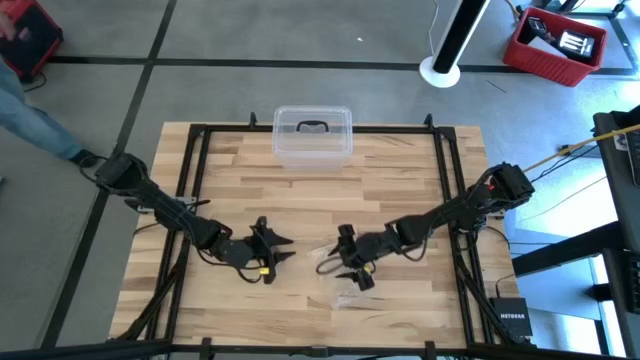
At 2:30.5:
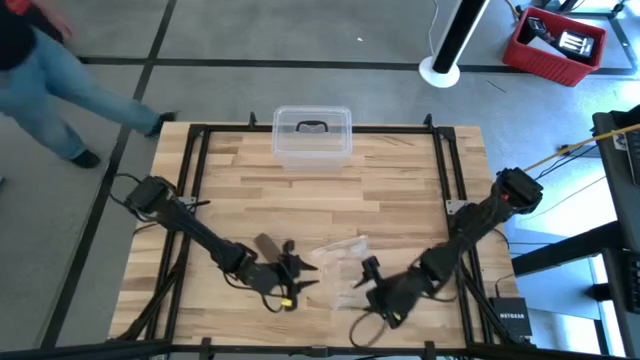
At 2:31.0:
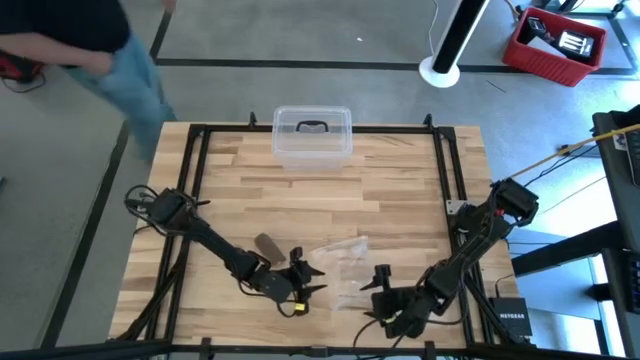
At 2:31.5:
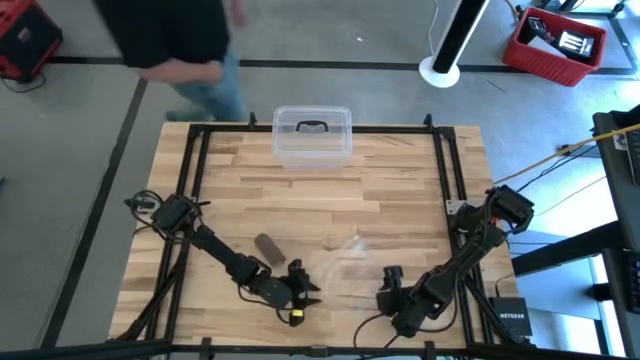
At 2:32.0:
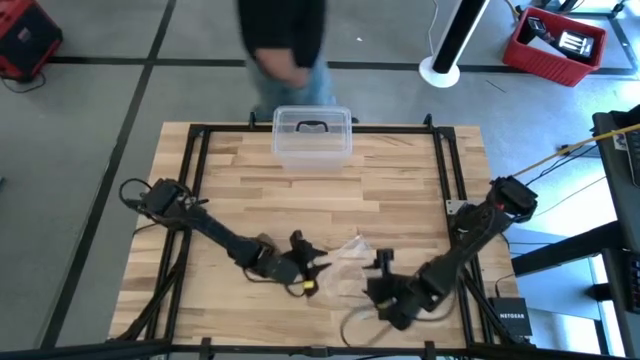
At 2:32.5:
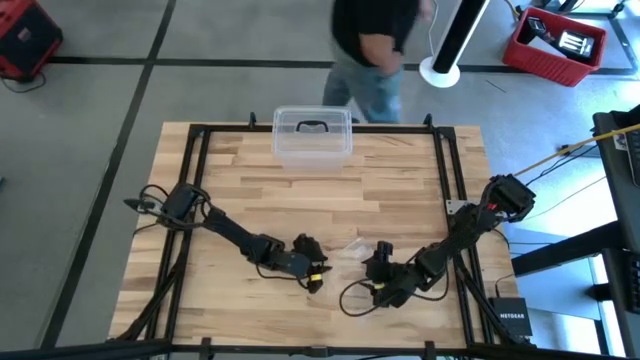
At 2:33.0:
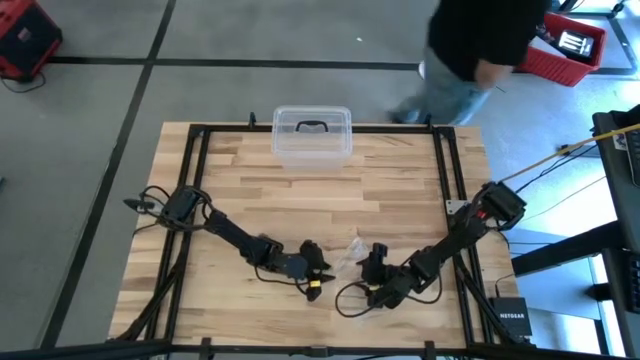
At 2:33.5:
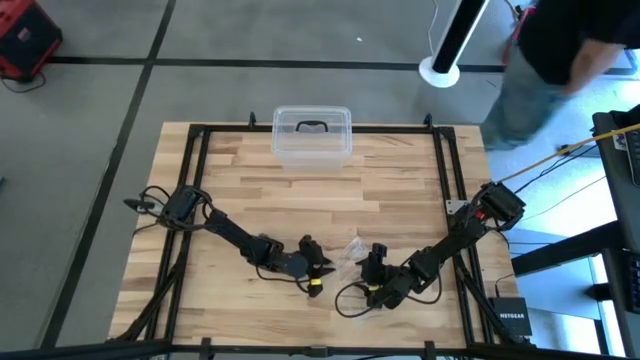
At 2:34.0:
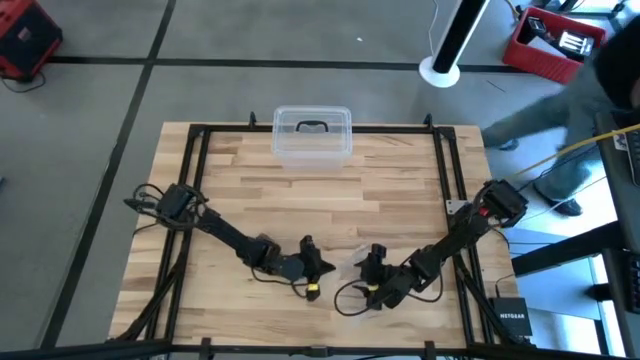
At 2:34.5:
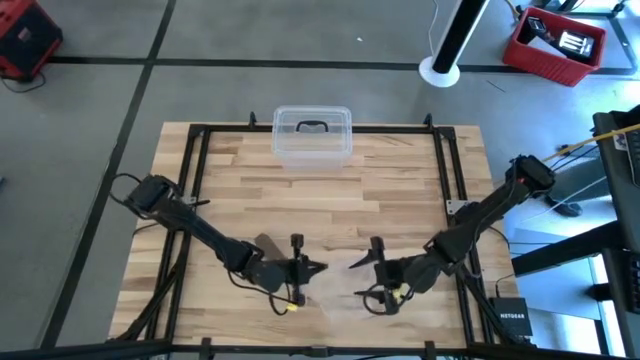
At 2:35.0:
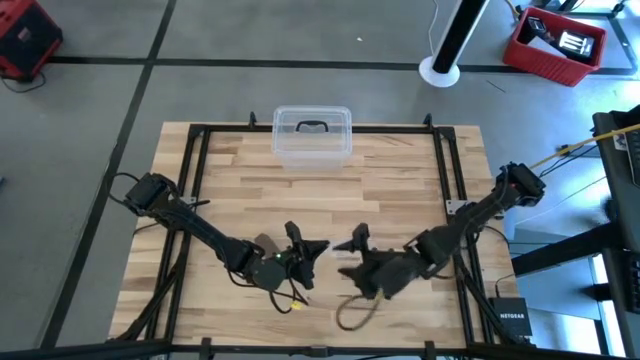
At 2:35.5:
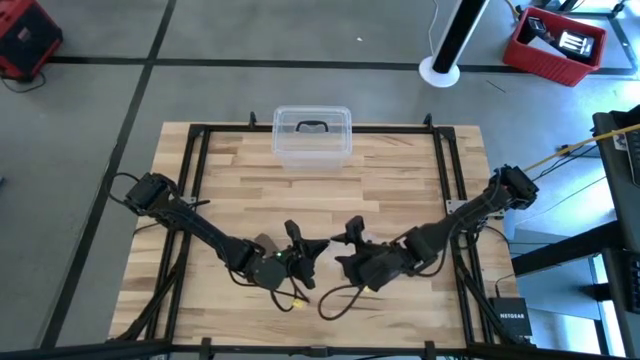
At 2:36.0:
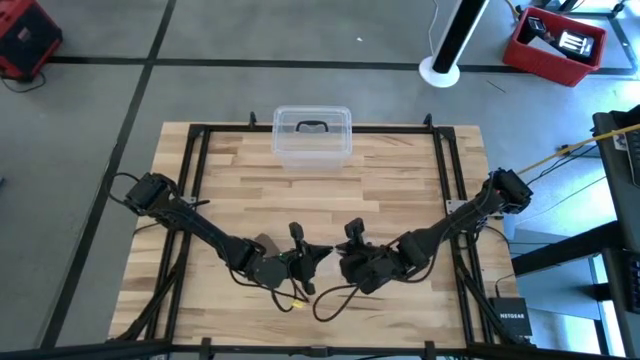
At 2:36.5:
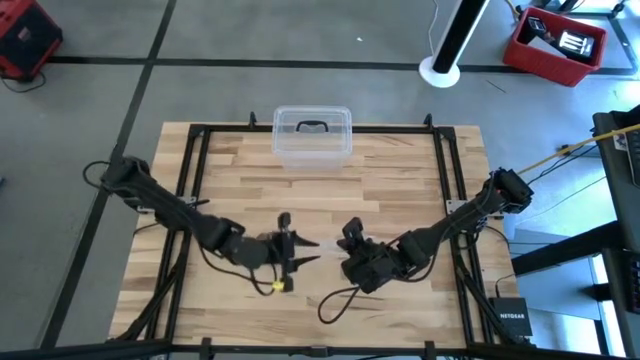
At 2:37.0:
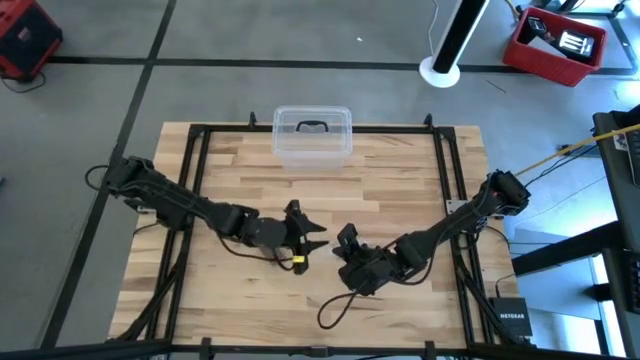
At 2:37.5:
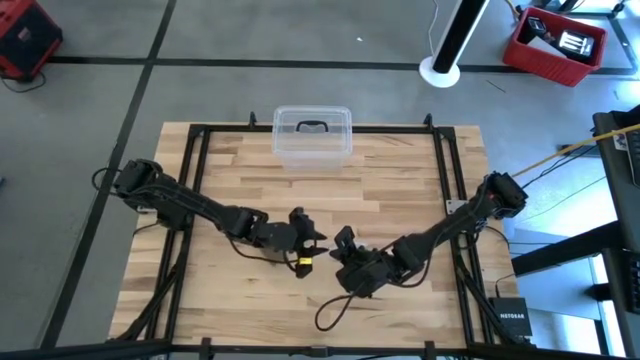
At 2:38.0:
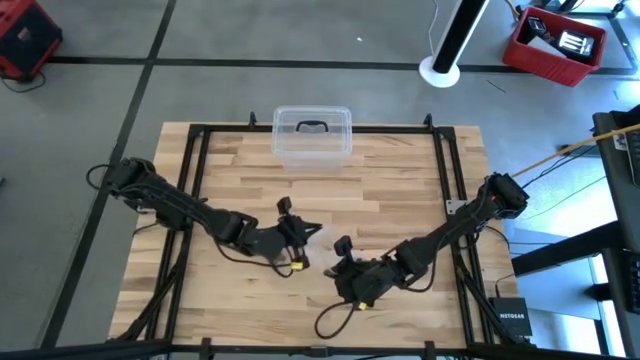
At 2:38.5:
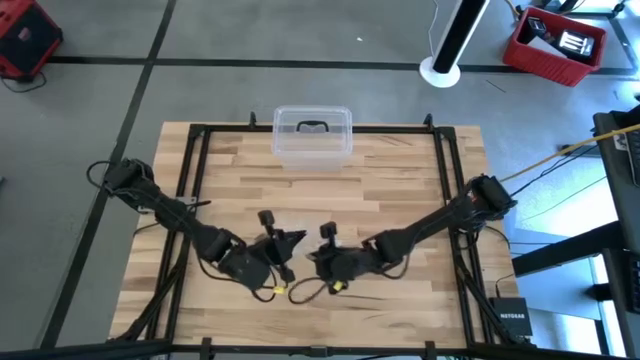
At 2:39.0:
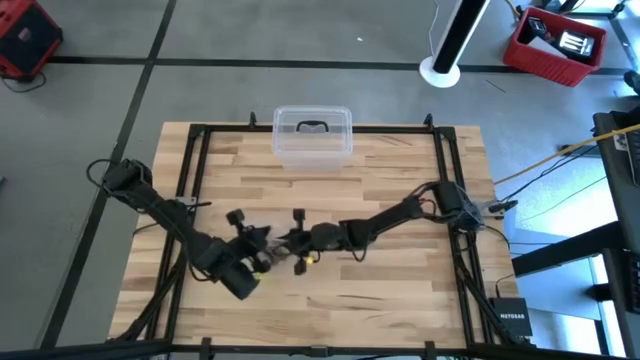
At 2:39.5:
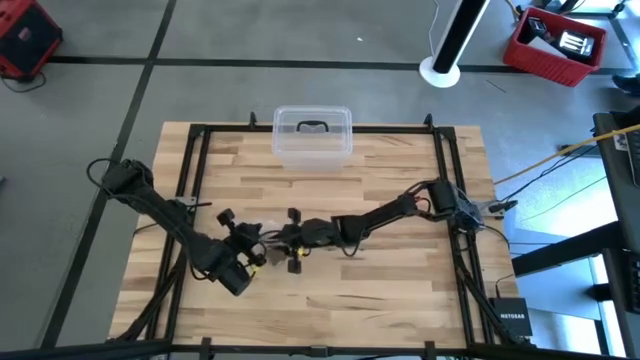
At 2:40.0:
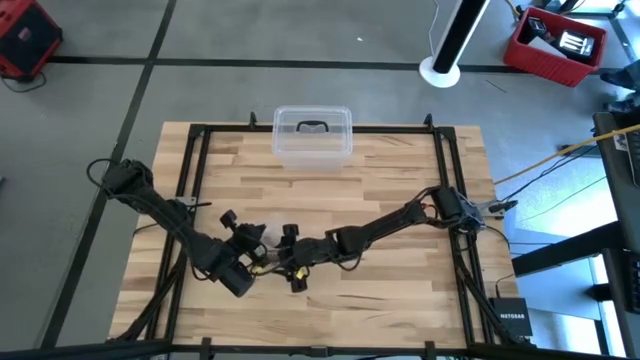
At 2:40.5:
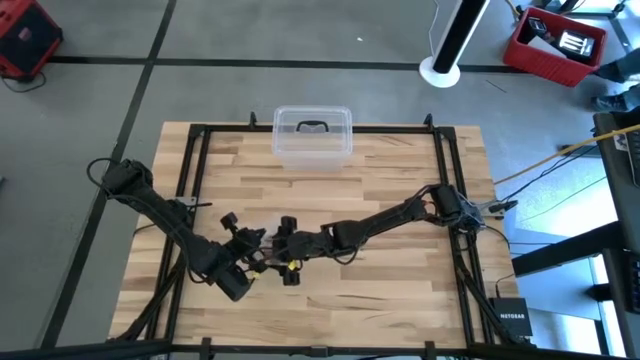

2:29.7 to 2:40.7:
Task: Roll bandage
Open the transparent zip bag

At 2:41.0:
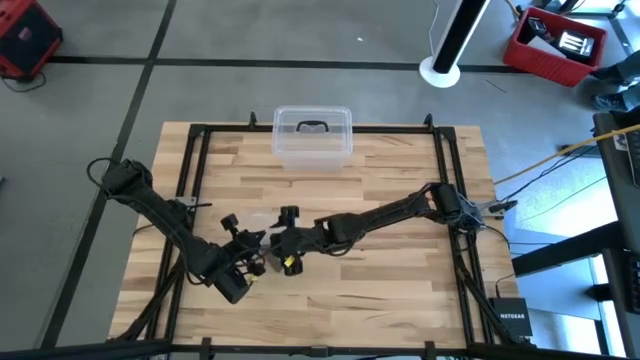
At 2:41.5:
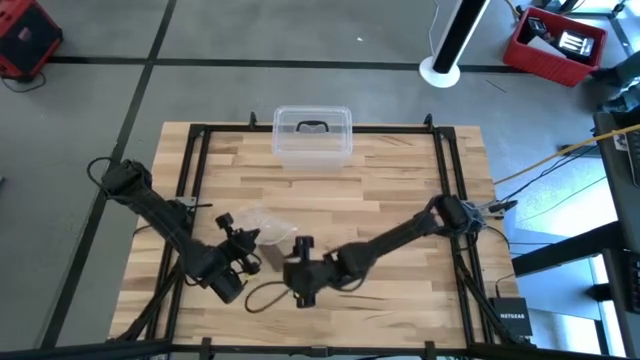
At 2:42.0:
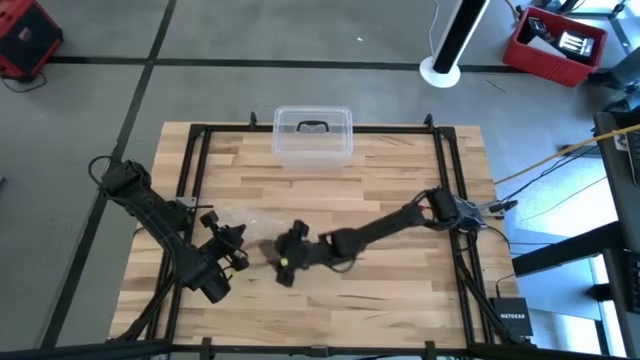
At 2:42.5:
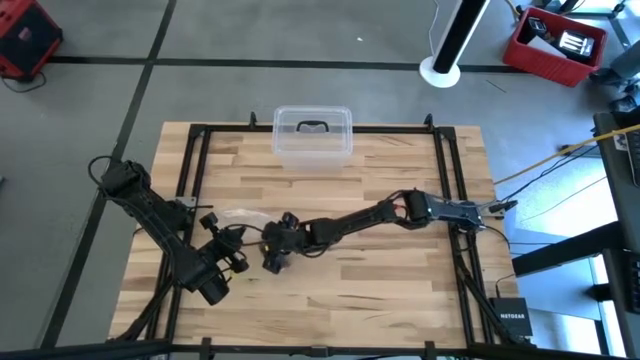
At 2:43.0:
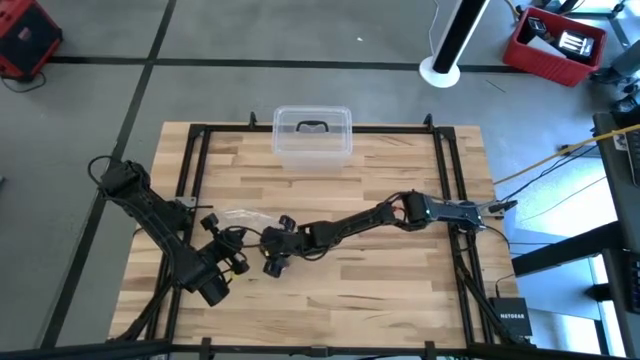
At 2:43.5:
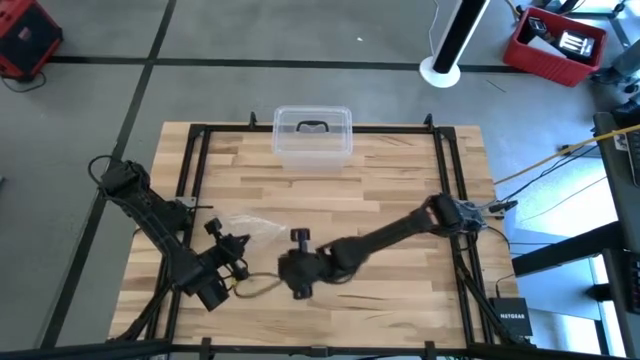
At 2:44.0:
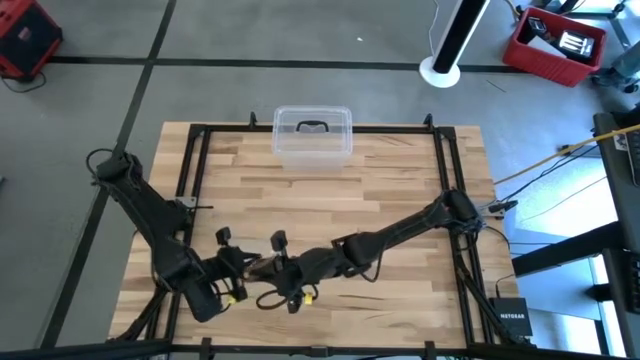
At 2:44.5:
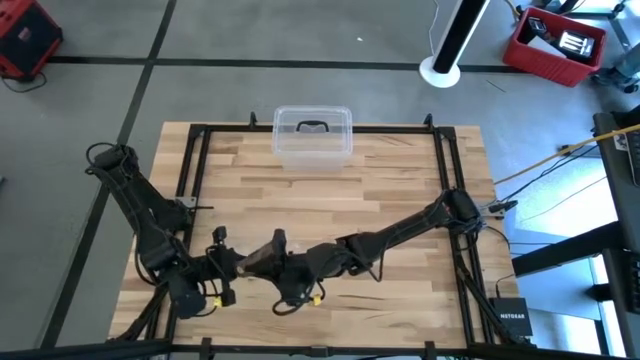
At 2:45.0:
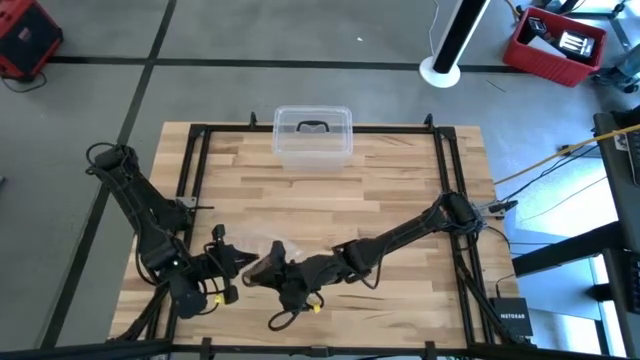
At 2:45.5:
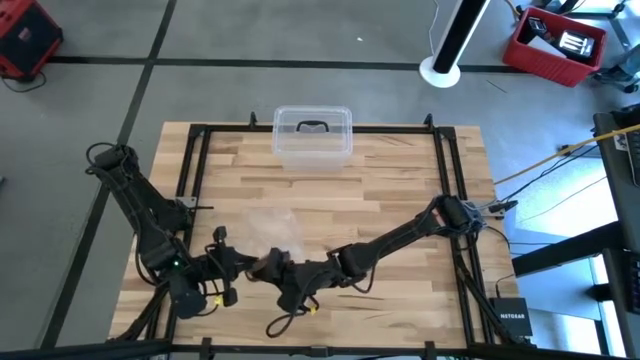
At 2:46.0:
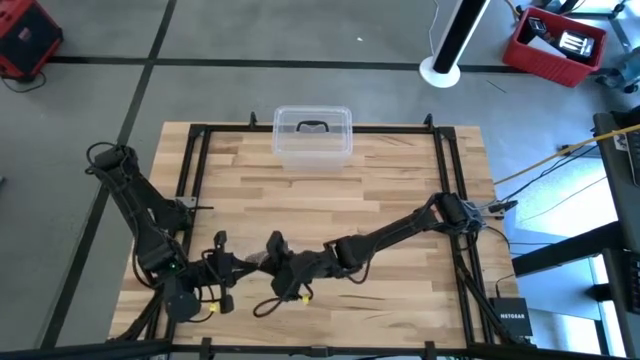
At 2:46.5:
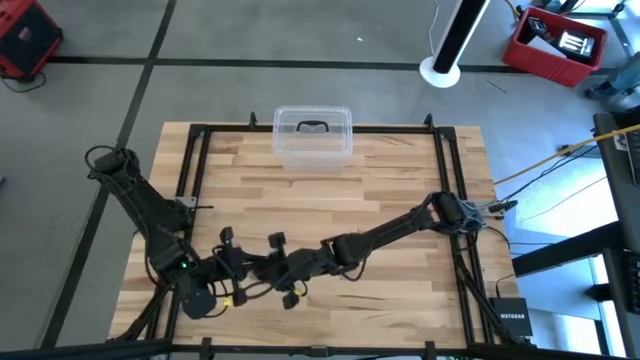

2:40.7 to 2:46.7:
Put the brown bandage into the transparent zip bag

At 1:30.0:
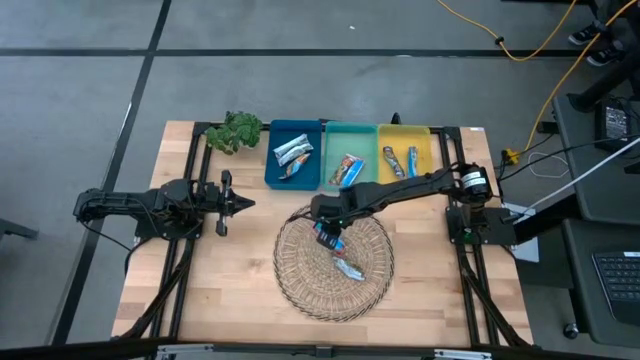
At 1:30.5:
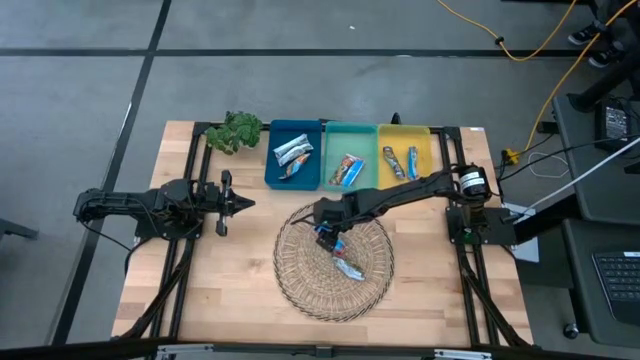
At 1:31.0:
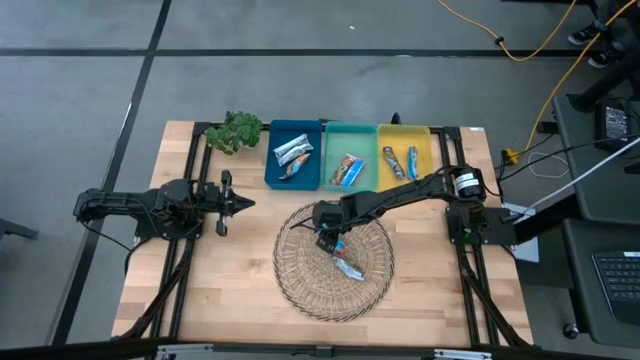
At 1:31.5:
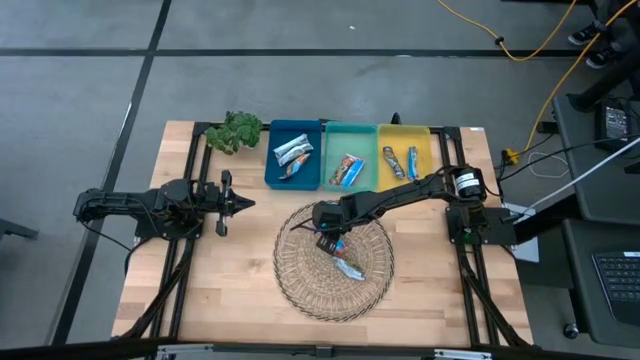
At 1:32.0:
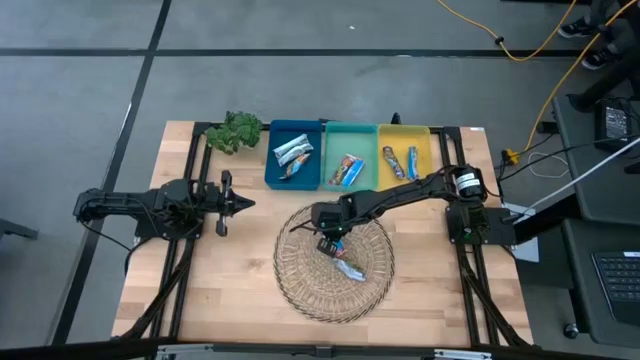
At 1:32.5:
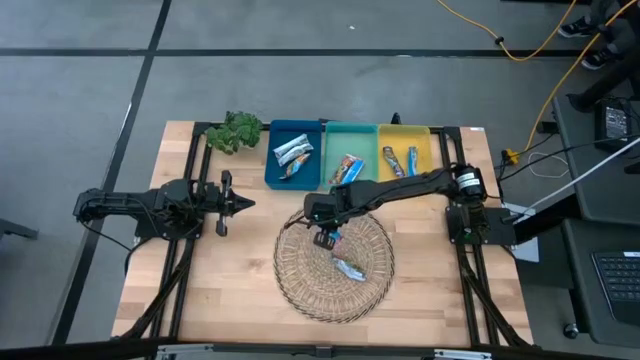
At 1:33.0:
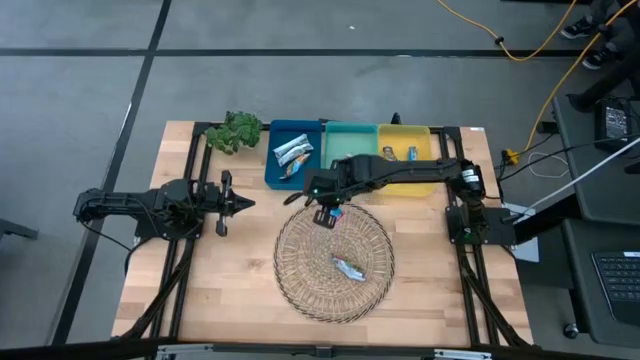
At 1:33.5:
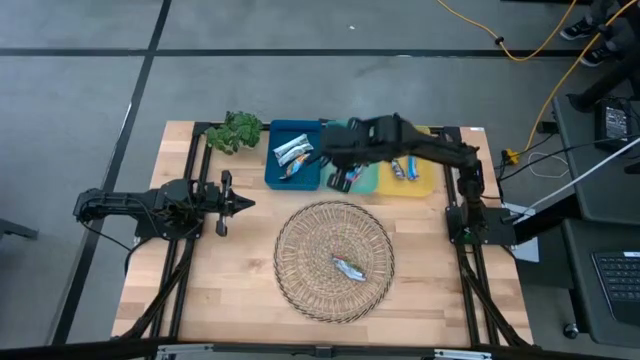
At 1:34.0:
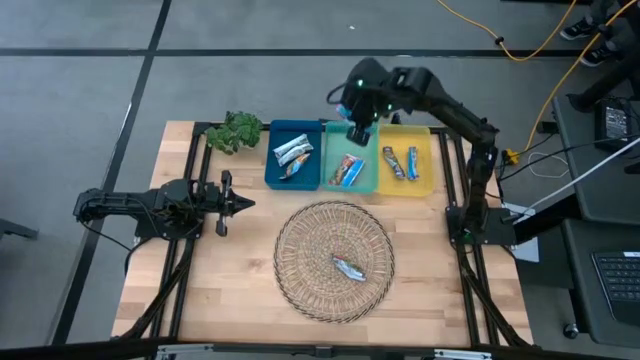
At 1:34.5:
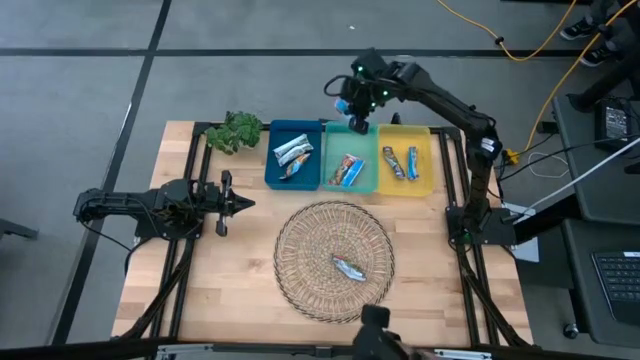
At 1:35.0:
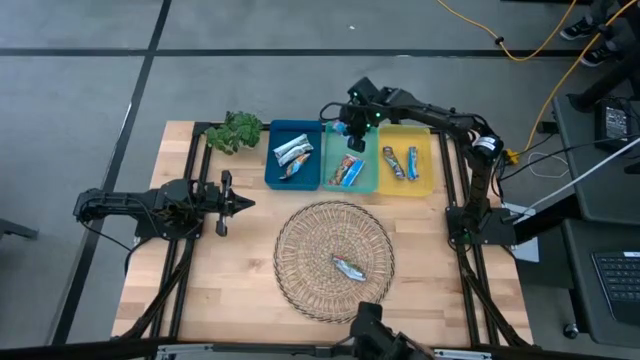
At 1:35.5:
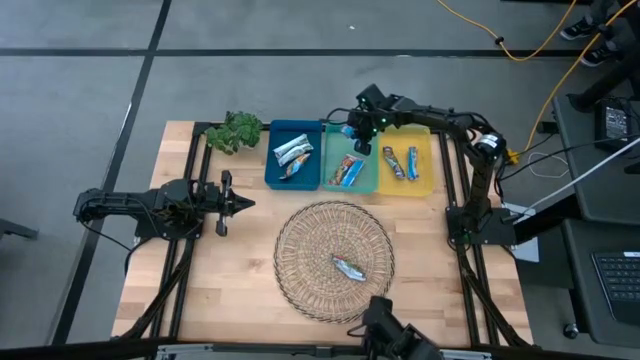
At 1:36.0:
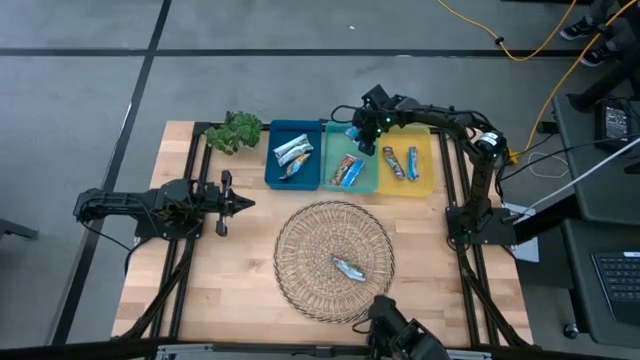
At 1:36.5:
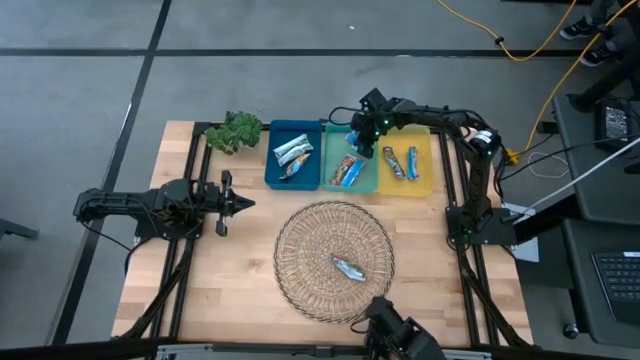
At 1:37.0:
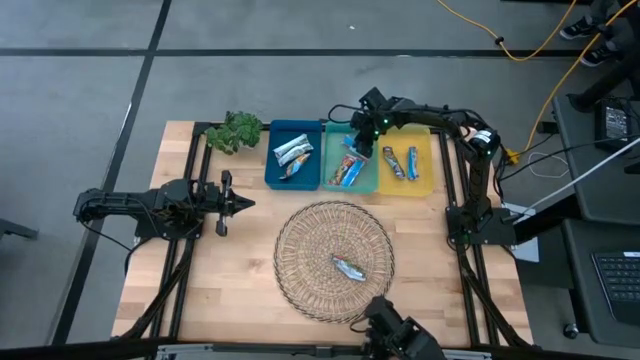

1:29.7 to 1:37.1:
Task: Pick and place Granola Bars by type
Put the orange granola bar into the green bin
